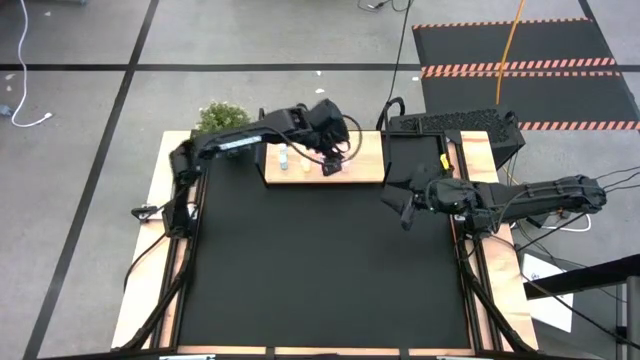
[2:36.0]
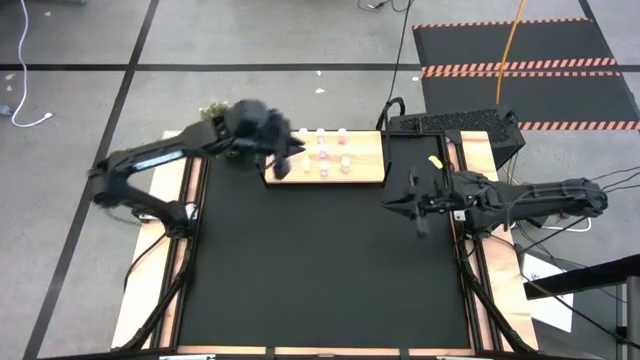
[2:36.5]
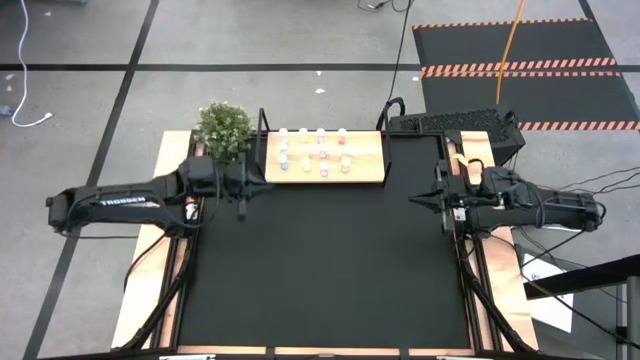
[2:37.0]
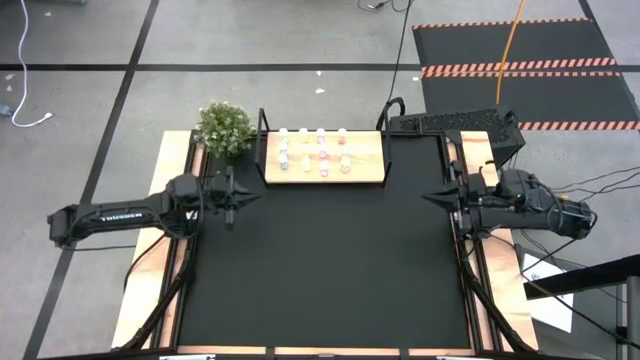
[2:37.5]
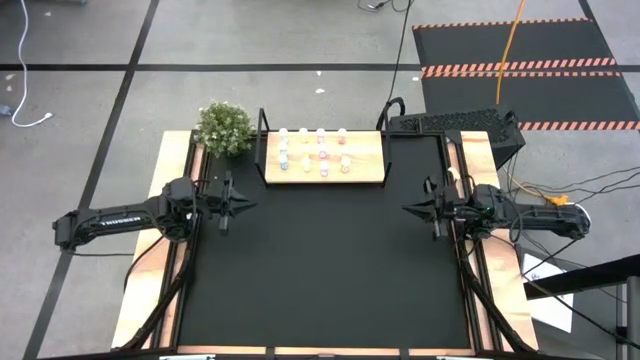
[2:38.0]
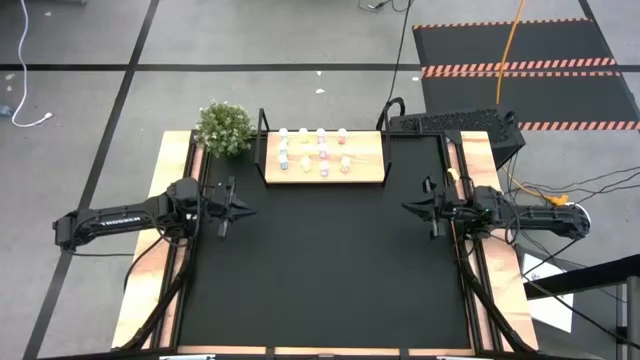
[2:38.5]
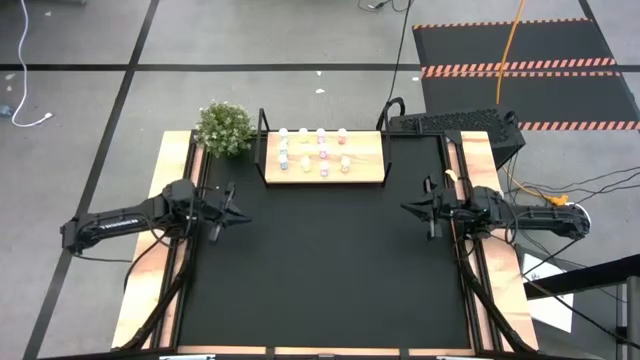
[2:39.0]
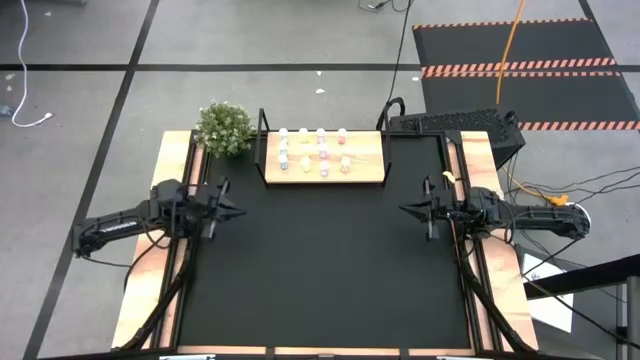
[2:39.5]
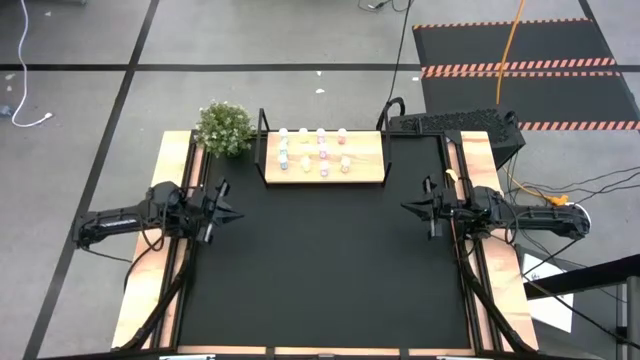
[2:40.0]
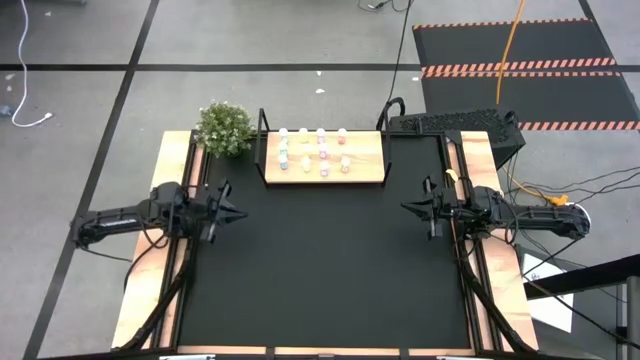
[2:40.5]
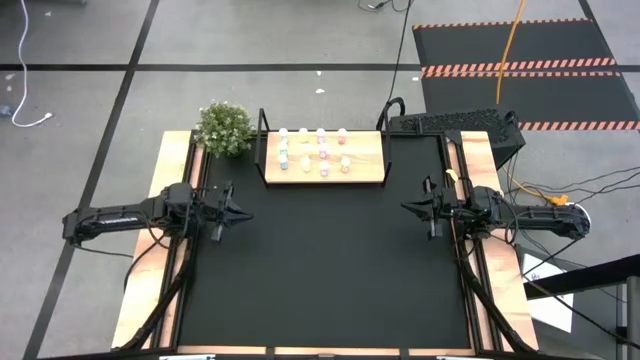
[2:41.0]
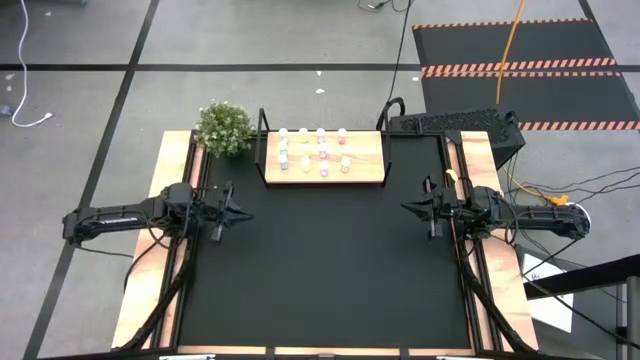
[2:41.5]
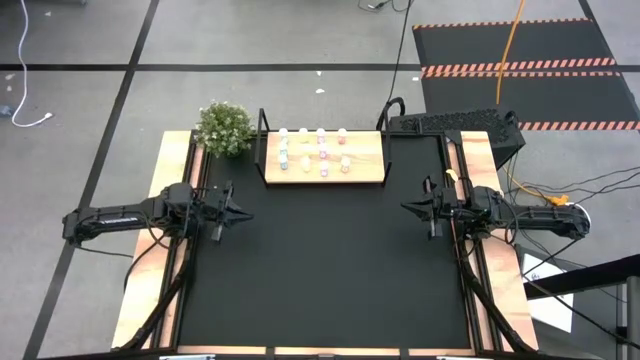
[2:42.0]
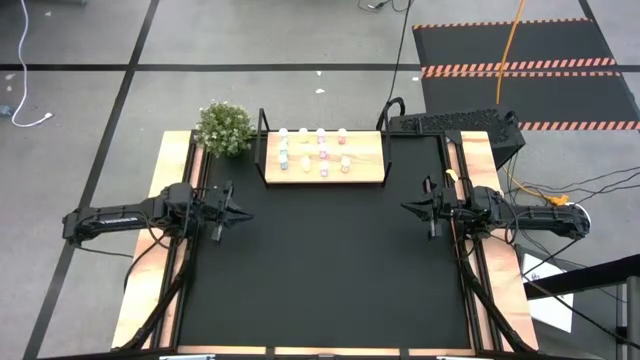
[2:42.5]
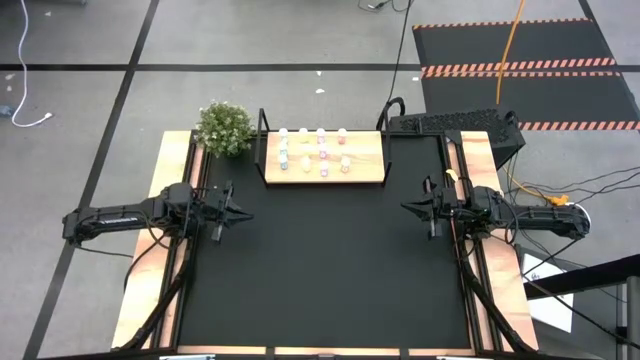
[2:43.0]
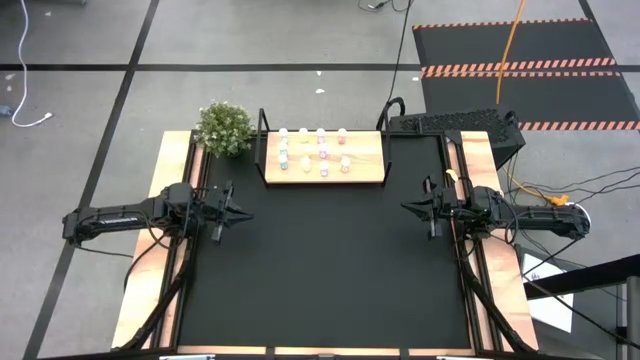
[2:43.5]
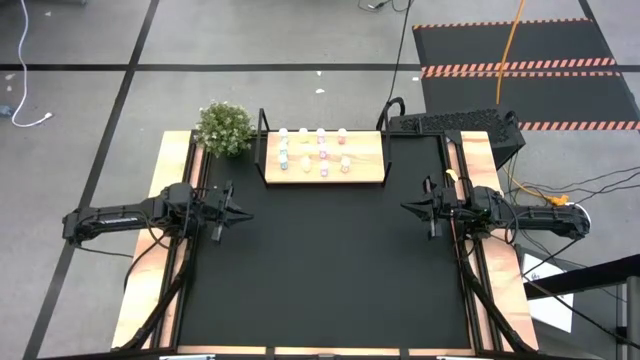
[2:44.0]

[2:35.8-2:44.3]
Task: Pick and place medicine bottles onto shelf by color
Return to Home Position

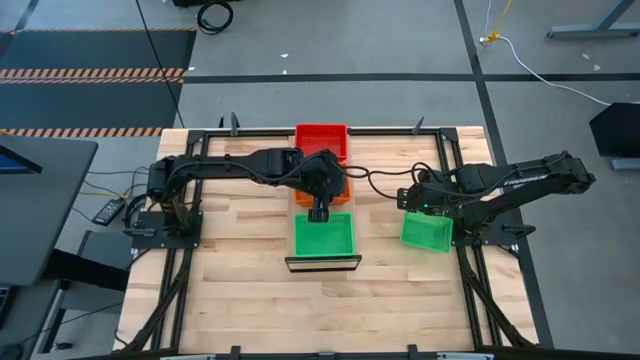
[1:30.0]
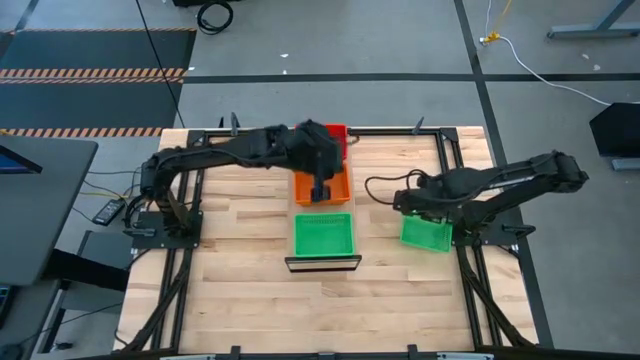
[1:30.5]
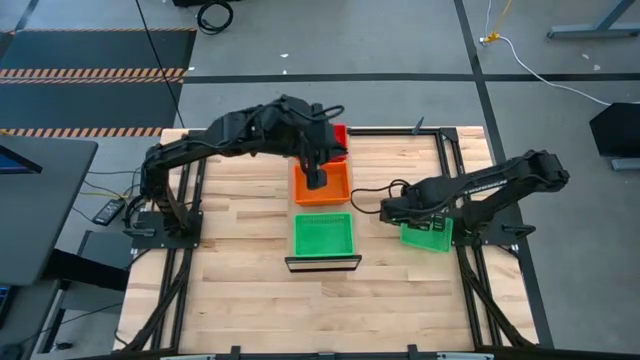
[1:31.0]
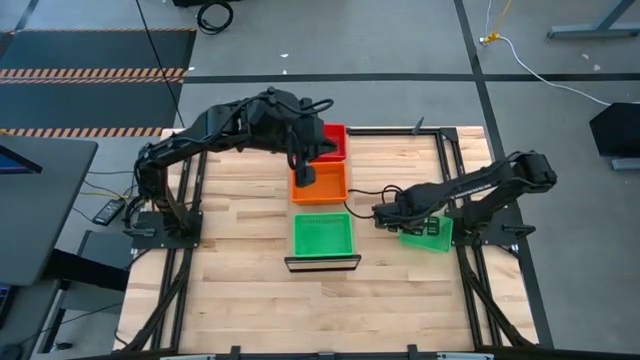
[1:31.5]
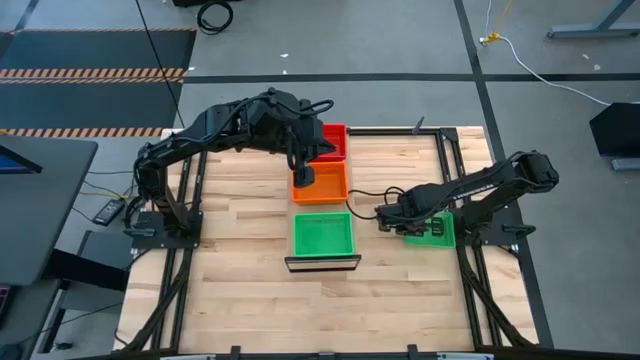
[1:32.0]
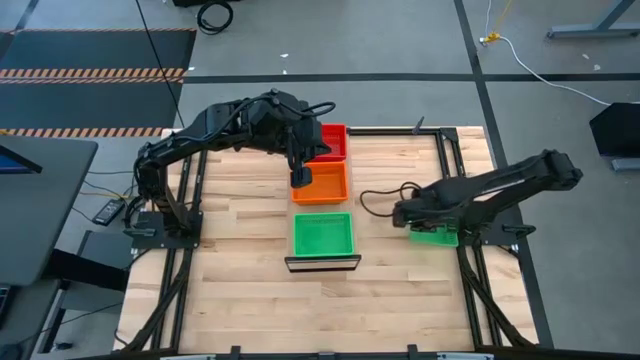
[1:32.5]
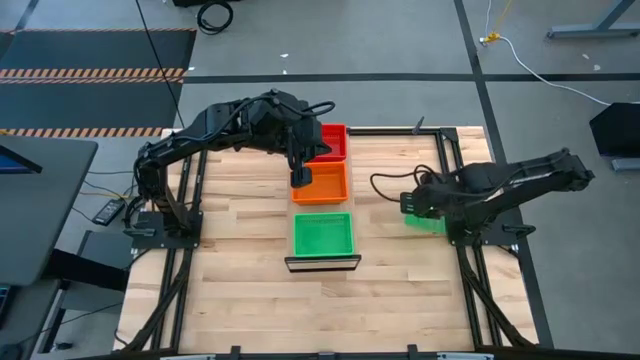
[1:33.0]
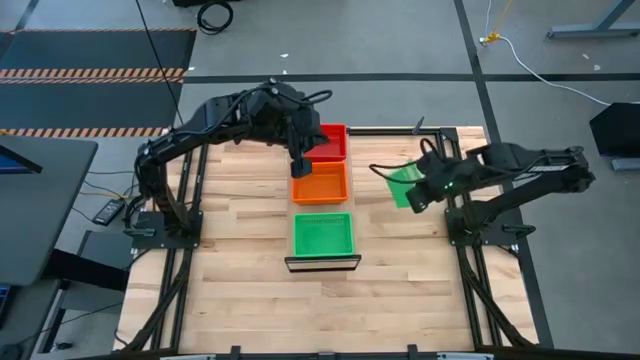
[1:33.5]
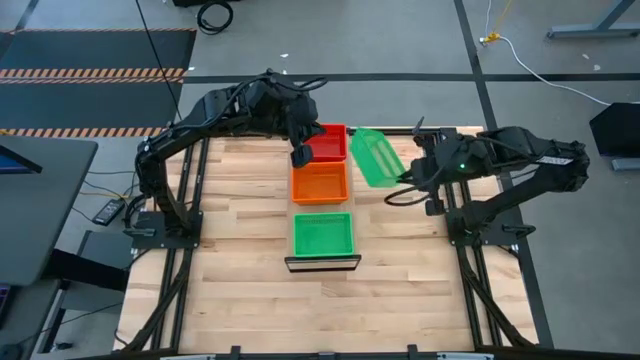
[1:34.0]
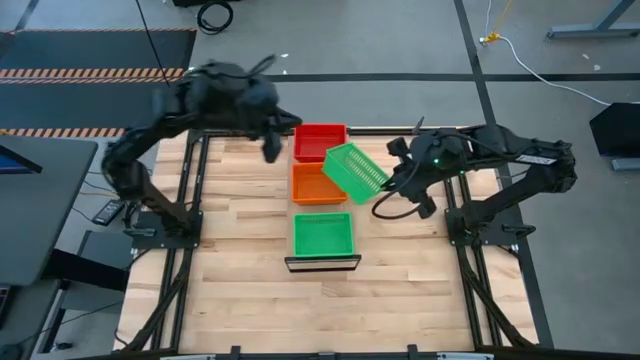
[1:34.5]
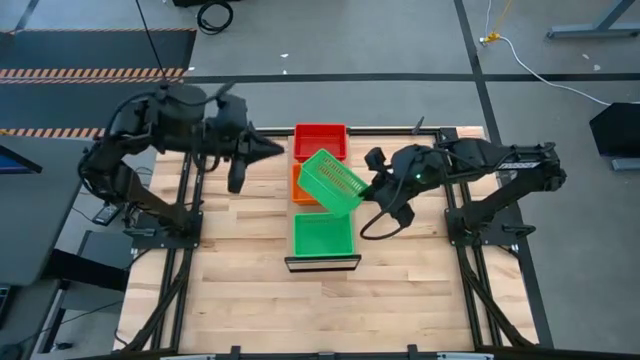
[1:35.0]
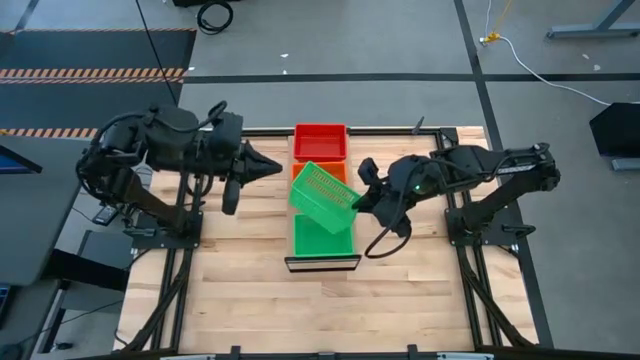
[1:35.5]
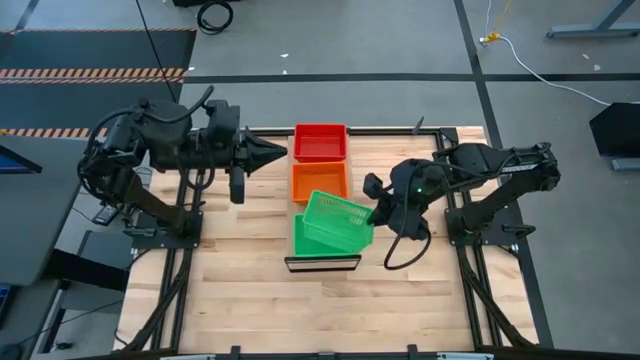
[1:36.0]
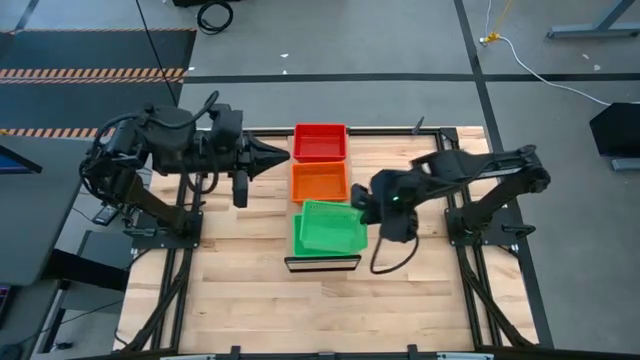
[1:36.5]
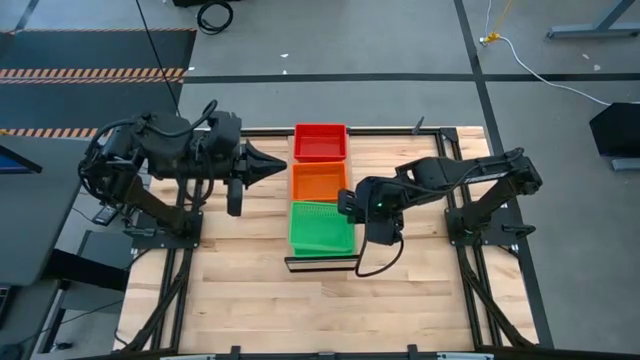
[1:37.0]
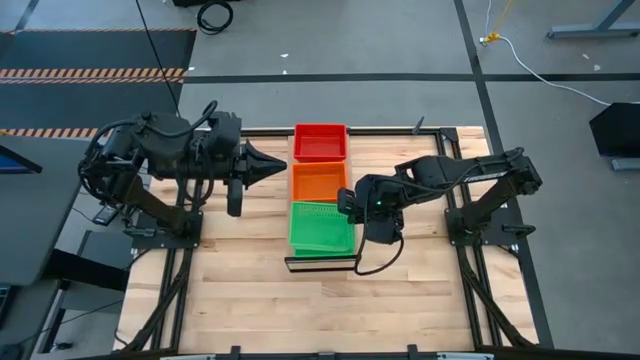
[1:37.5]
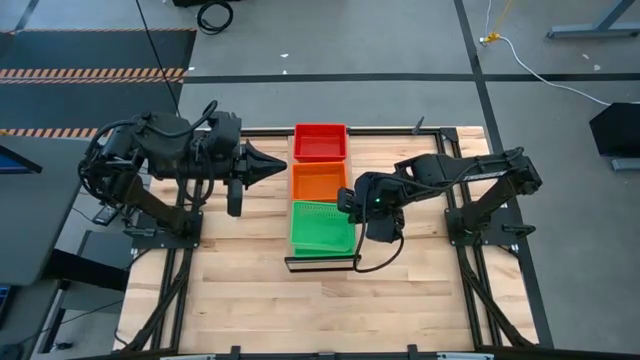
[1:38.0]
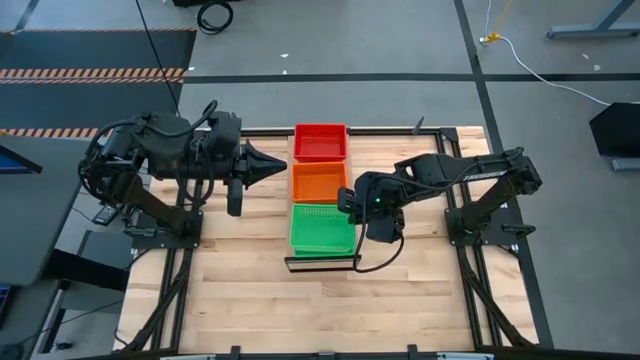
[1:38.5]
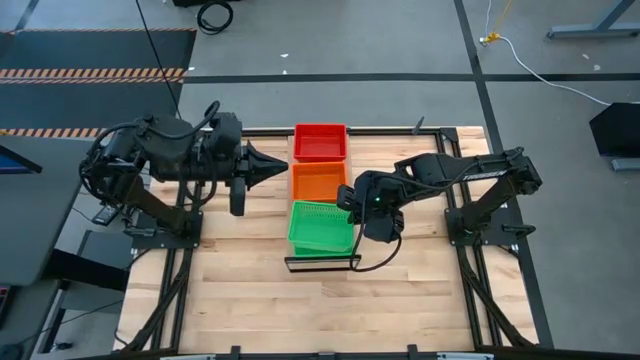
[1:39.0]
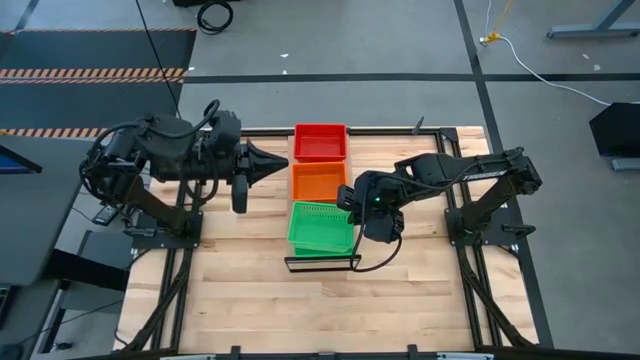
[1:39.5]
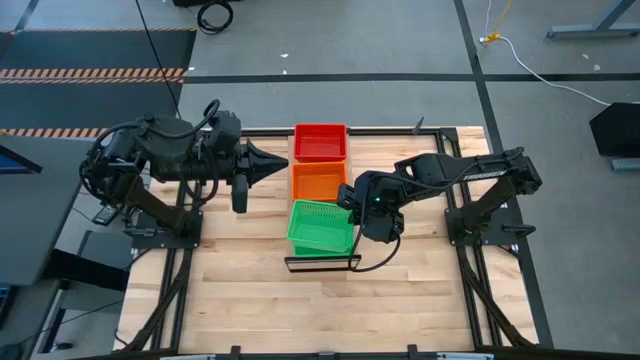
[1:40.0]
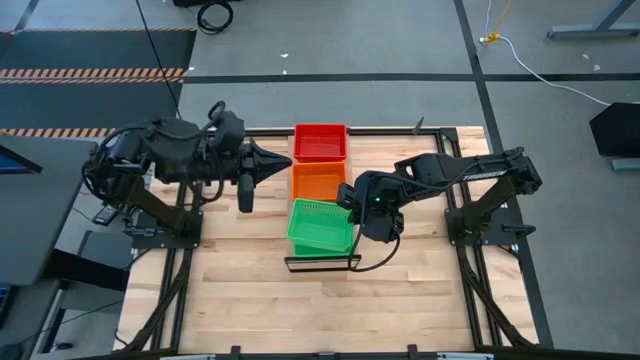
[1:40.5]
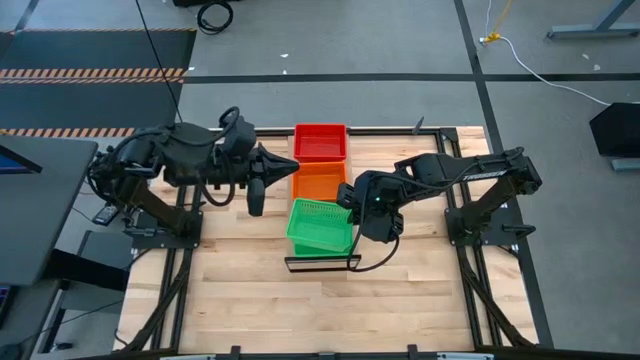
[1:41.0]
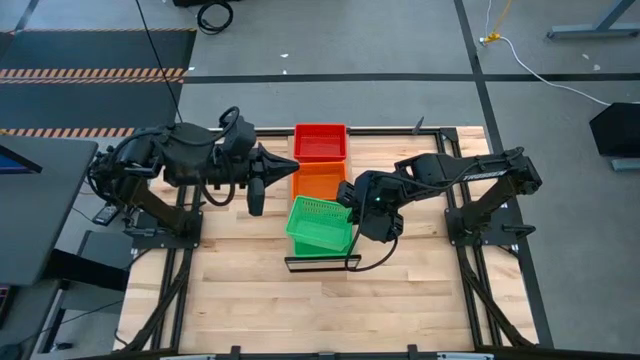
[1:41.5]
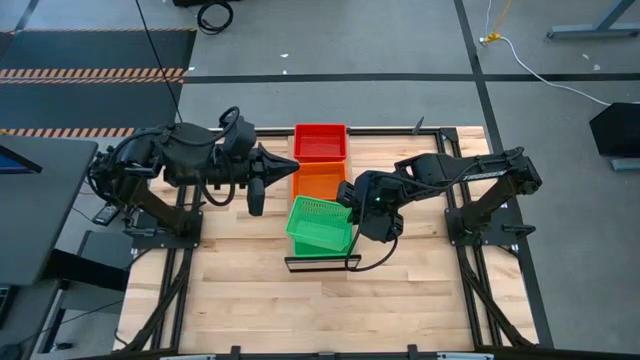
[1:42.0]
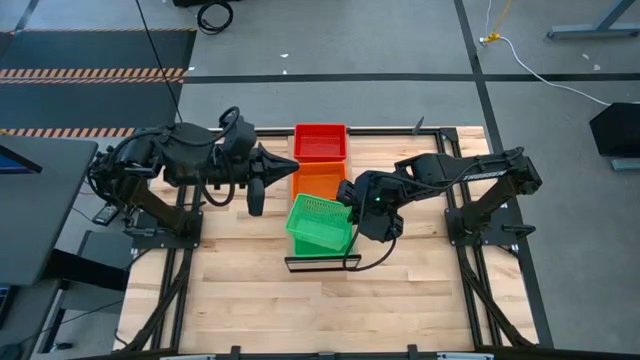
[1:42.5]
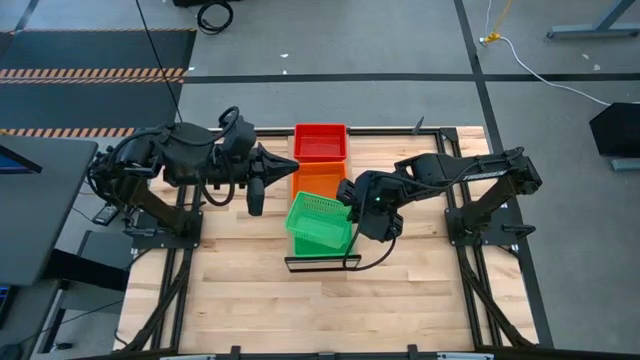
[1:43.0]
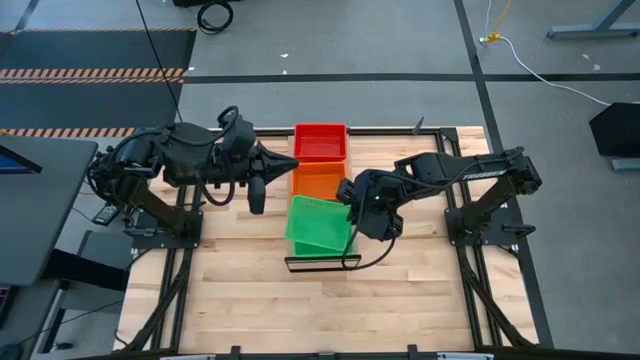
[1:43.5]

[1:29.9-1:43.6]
Task: Stack baskets on shelf by color
Stack the green basket on top of the green baskets on the shelf
